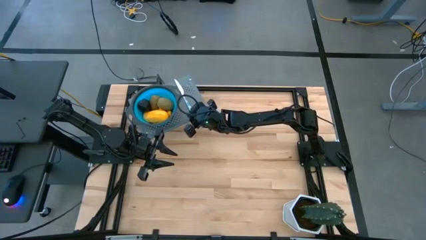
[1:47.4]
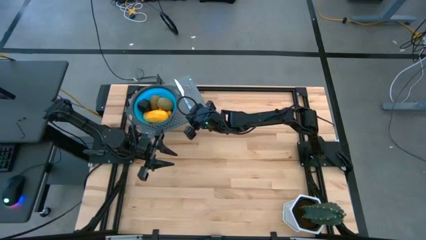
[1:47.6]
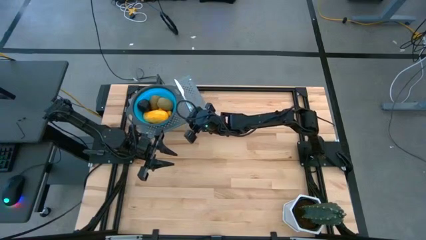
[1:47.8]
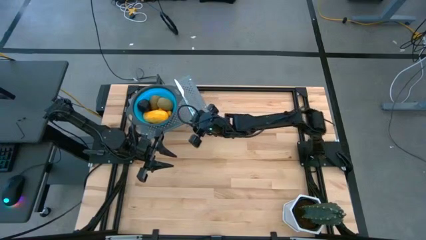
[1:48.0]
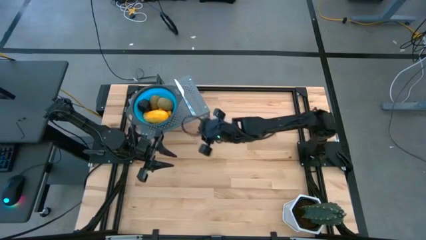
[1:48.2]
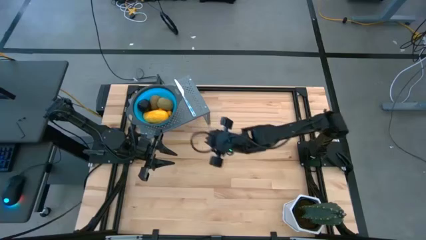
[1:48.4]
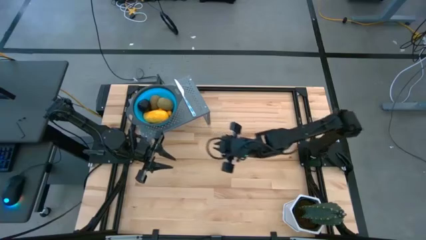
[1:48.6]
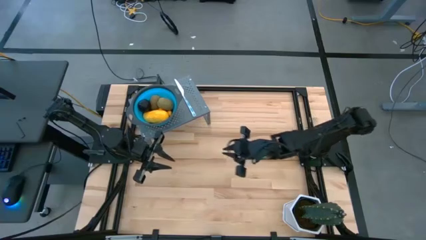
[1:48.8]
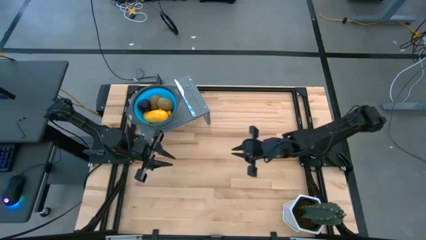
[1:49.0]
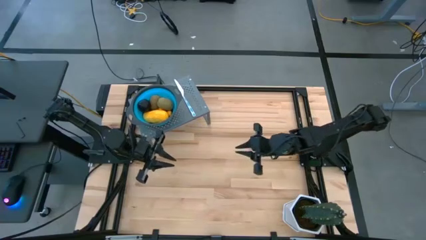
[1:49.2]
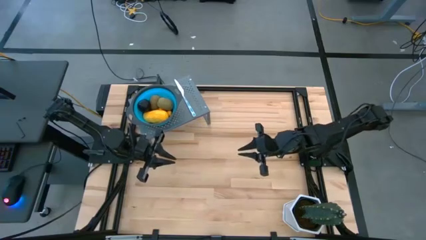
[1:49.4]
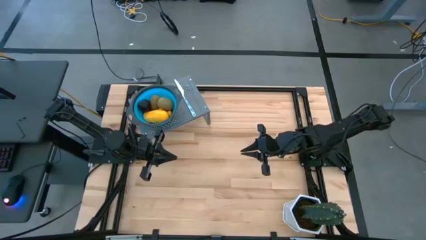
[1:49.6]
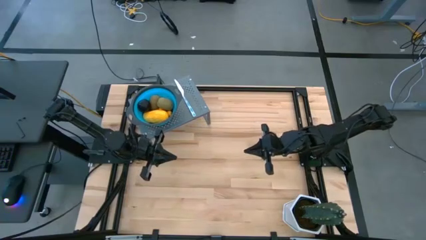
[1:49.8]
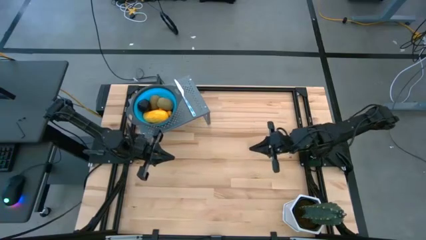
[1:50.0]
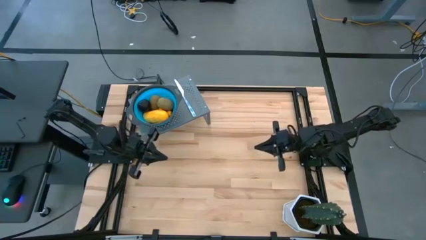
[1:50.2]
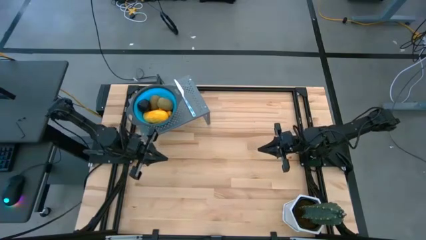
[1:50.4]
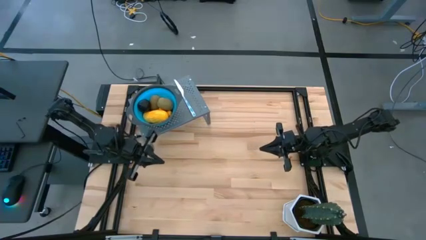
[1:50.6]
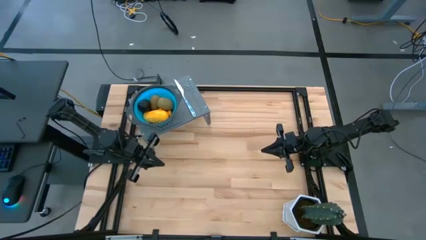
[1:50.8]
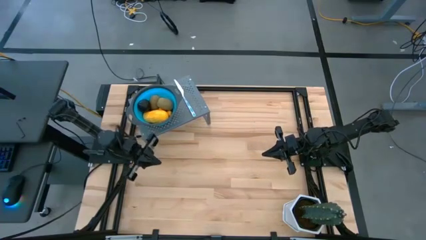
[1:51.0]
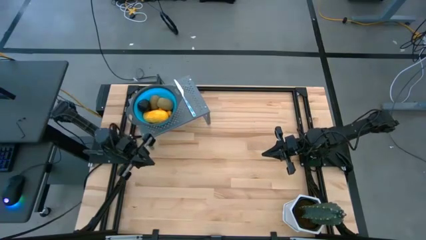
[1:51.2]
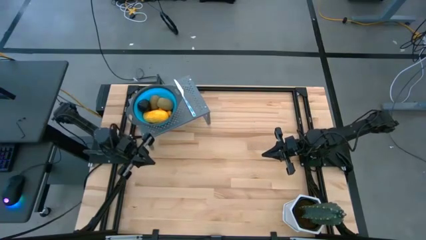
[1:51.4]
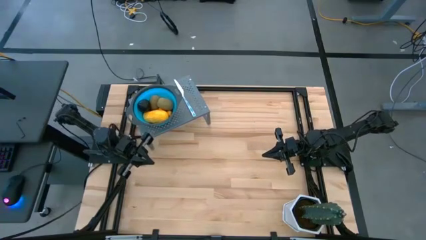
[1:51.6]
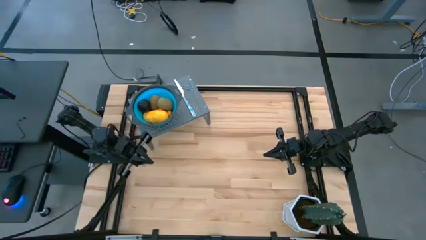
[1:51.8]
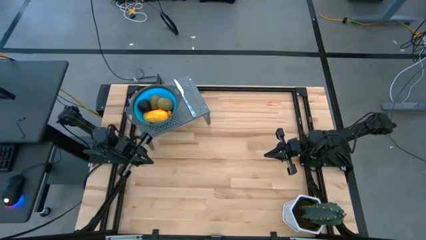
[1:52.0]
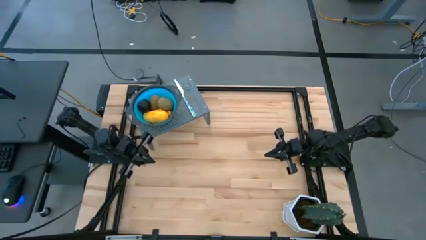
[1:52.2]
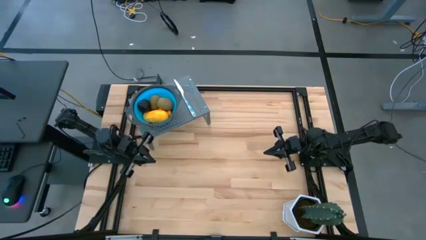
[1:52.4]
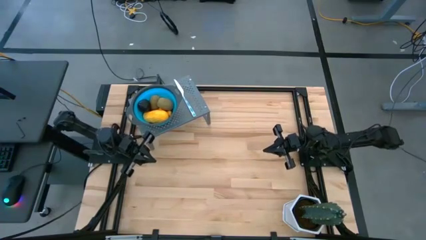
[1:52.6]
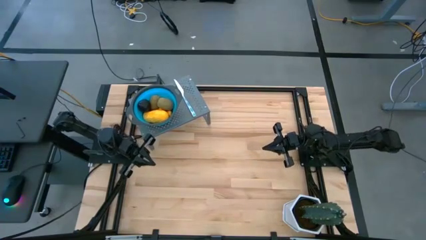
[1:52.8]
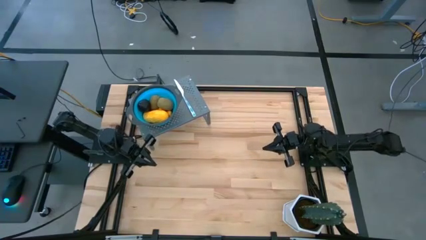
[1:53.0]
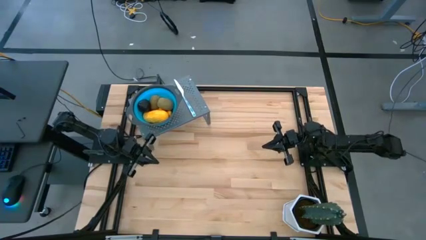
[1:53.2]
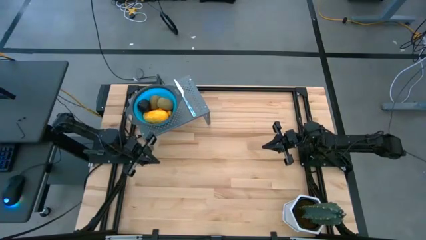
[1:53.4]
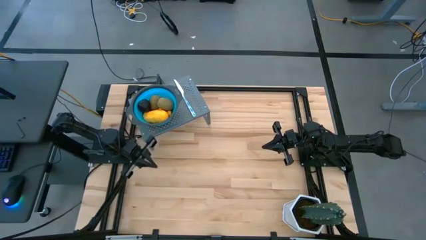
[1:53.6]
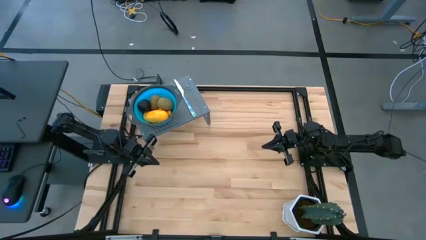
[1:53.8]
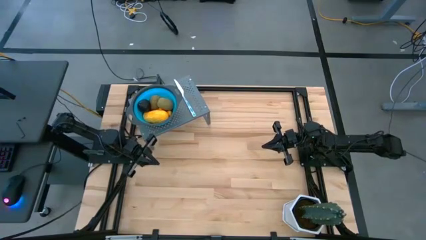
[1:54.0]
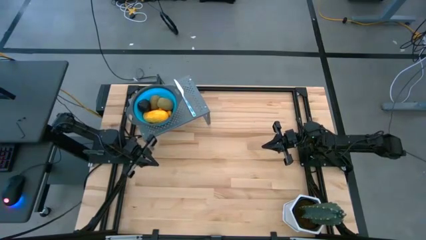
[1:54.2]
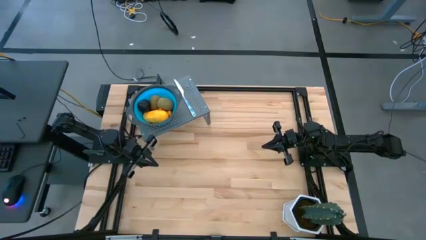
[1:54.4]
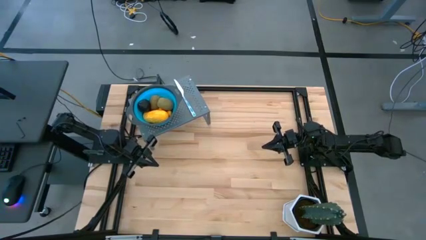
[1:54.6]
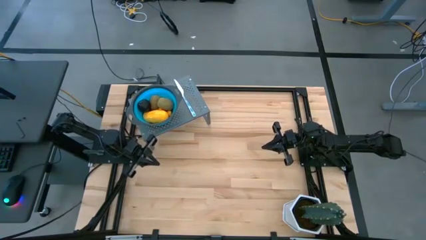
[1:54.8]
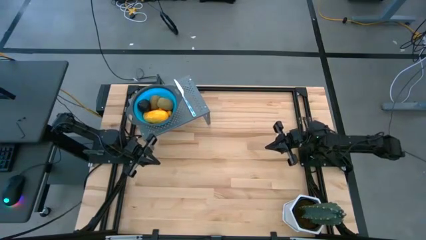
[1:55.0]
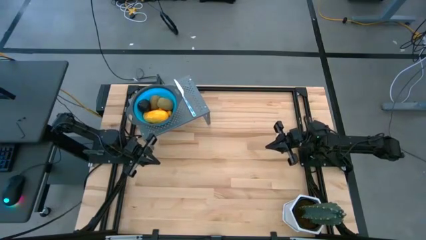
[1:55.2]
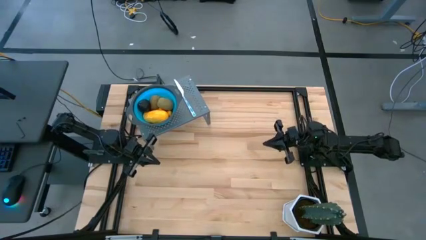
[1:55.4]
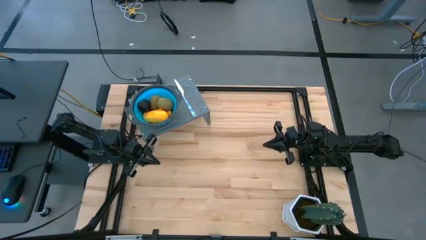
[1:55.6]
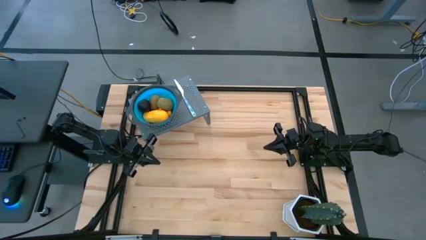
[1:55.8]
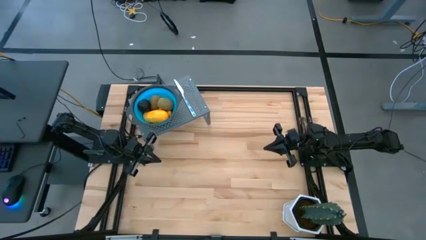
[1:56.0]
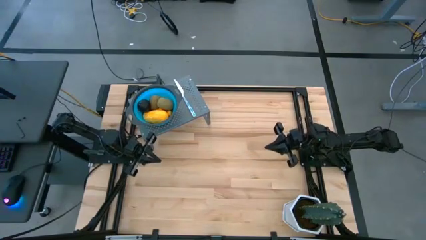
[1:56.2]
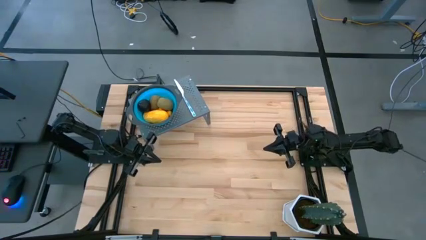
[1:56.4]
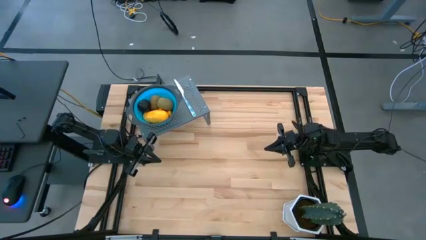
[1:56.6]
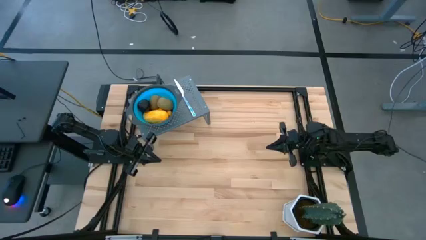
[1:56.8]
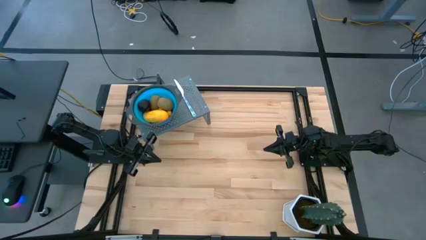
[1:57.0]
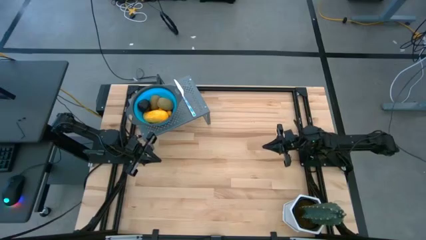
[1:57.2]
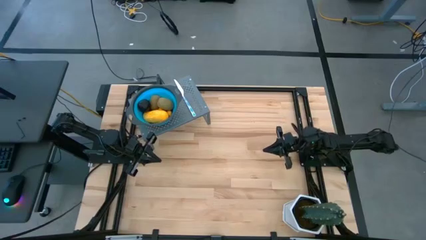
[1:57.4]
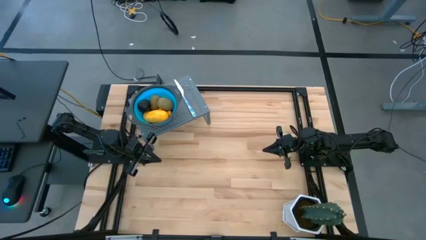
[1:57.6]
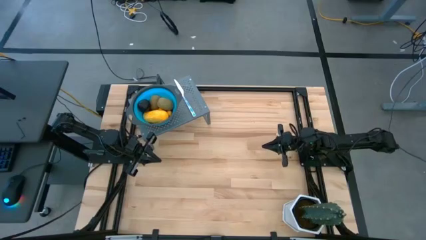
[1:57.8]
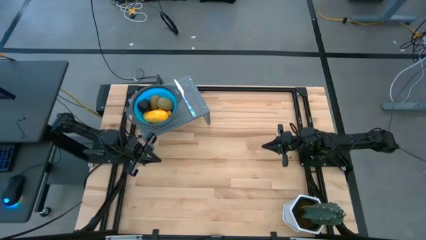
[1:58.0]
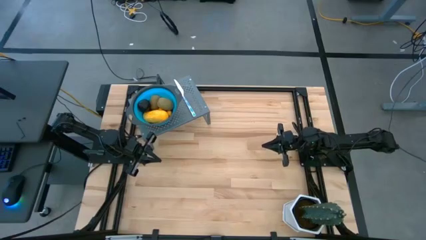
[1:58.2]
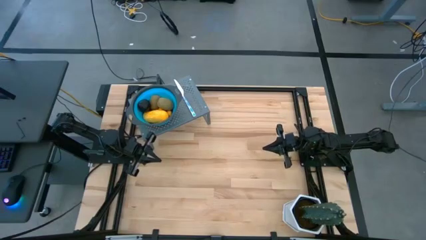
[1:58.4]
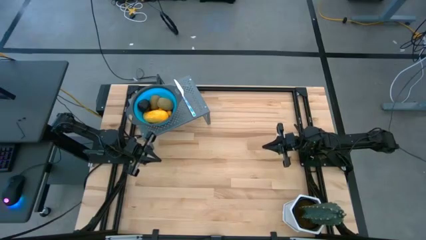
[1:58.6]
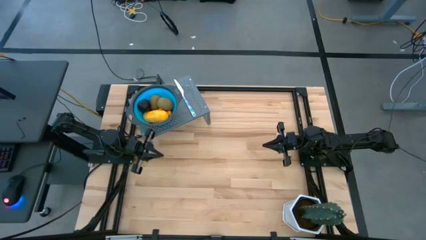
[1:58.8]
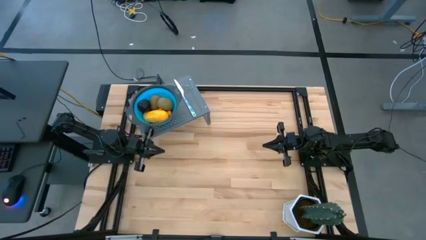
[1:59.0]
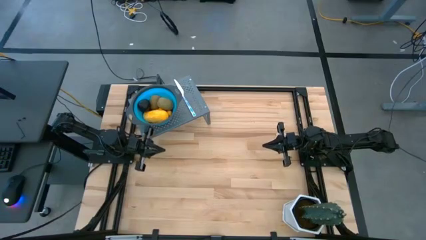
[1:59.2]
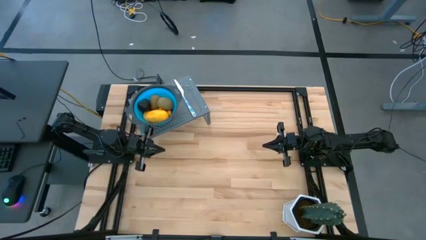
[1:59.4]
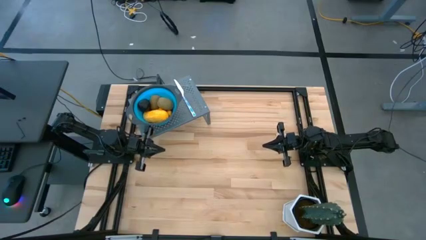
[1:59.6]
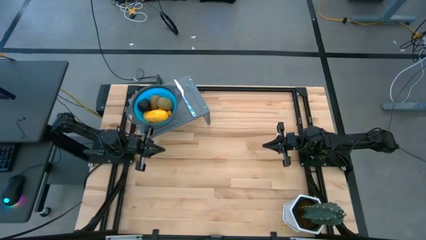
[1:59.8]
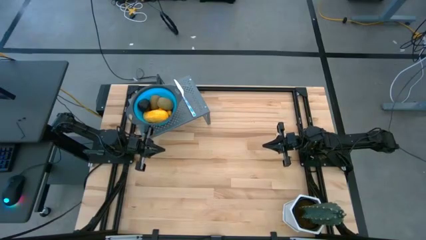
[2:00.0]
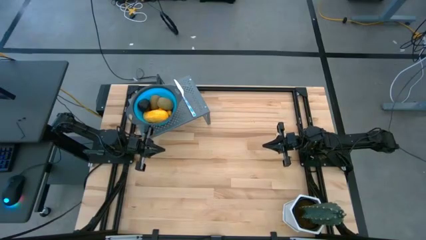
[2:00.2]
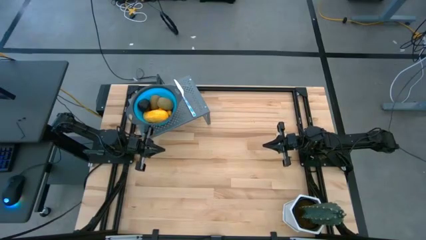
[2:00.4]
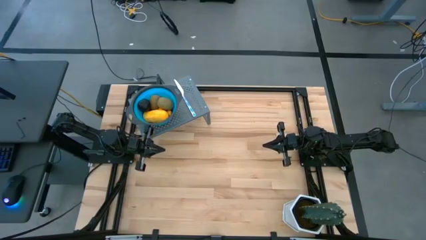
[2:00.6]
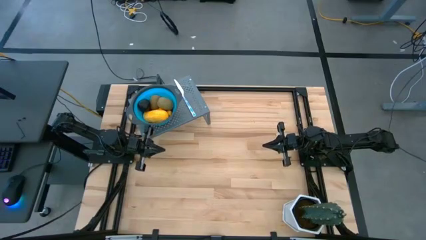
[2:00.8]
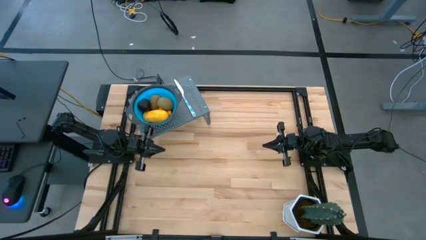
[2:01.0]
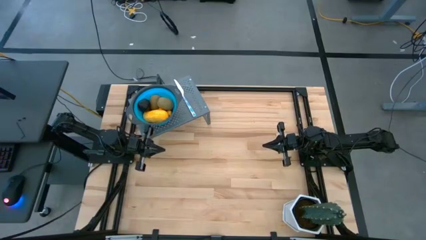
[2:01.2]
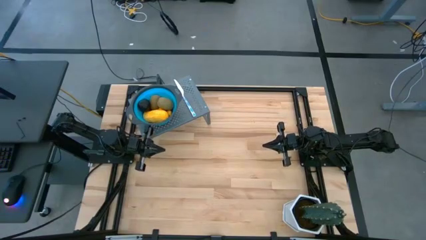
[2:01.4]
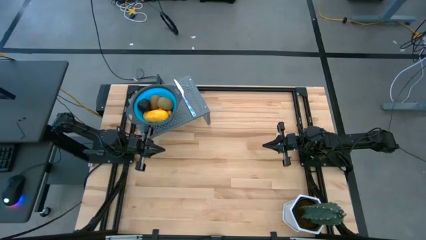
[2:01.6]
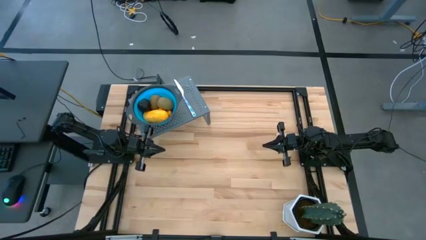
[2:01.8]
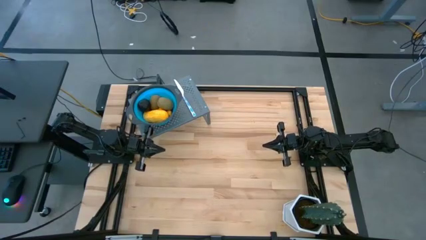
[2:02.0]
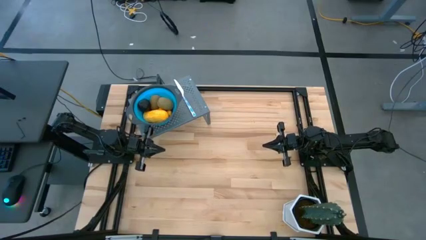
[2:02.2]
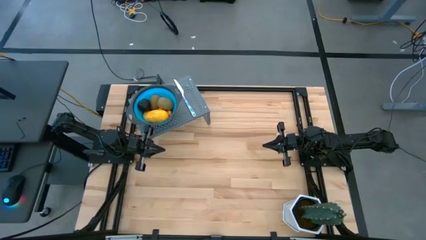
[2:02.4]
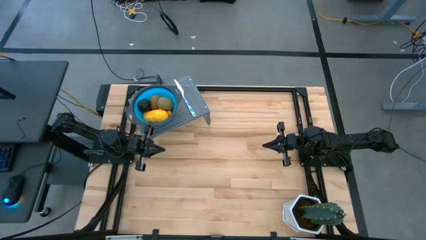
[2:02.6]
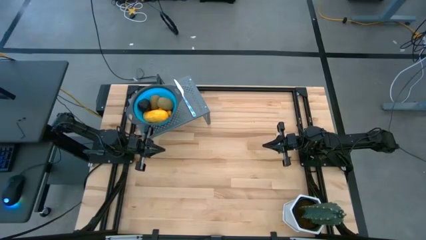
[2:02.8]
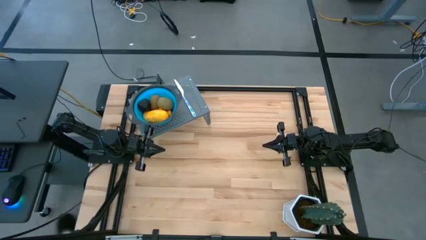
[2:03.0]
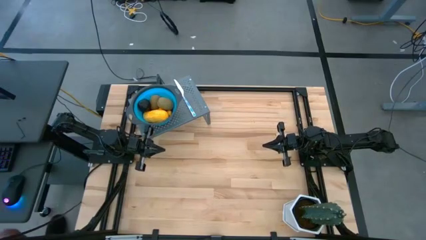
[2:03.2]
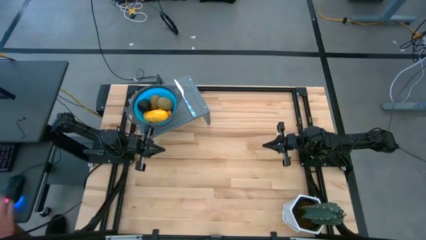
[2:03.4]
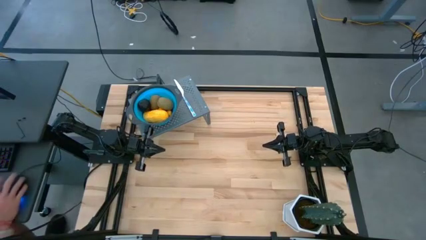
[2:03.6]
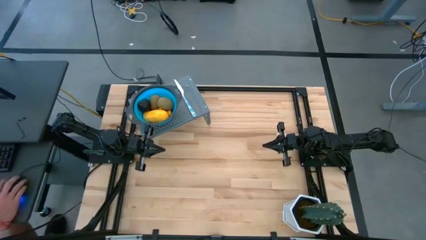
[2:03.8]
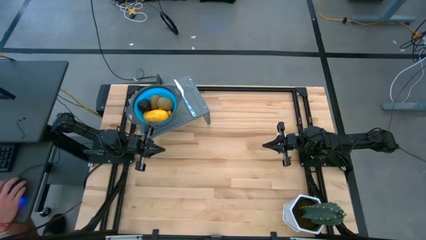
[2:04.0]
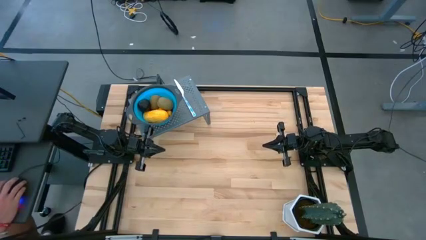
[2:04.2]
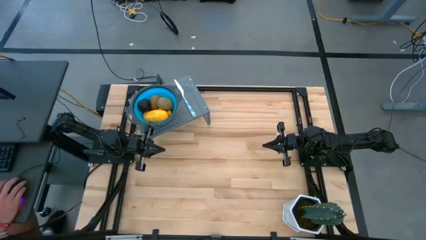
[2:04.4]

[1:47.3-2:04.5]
Task: Pick & Place Fruit
Return to Home Position
